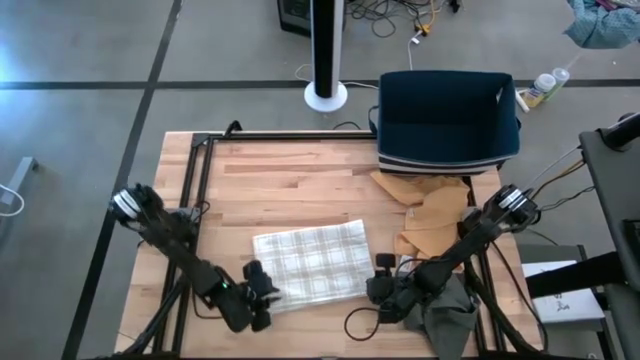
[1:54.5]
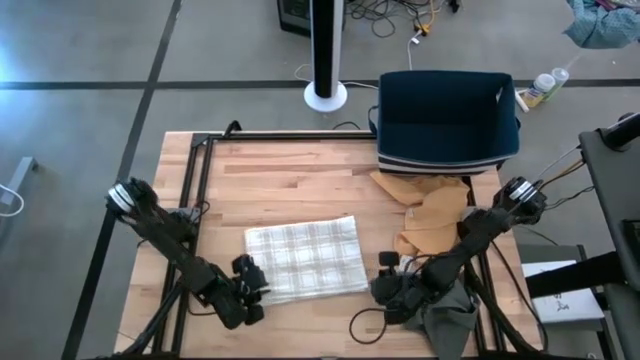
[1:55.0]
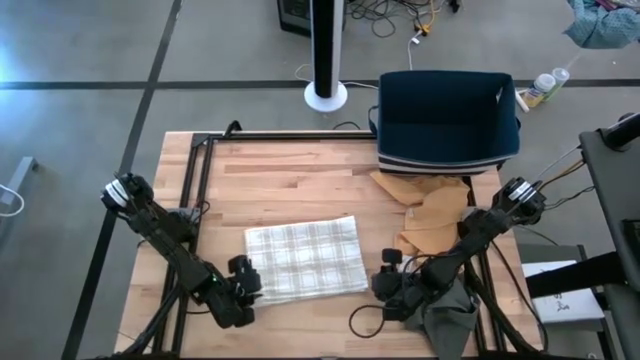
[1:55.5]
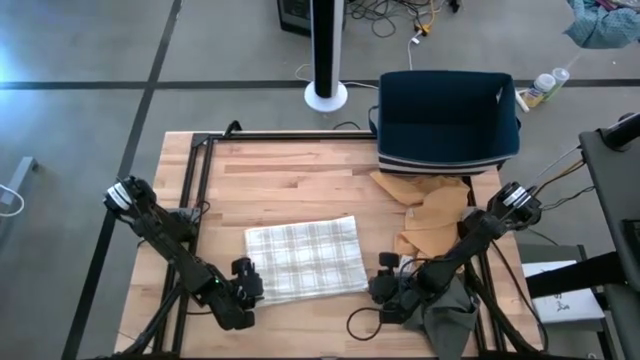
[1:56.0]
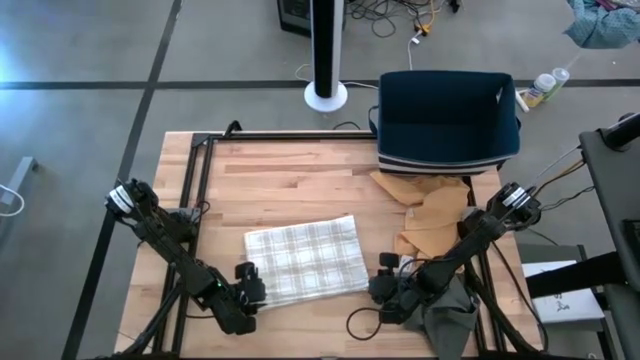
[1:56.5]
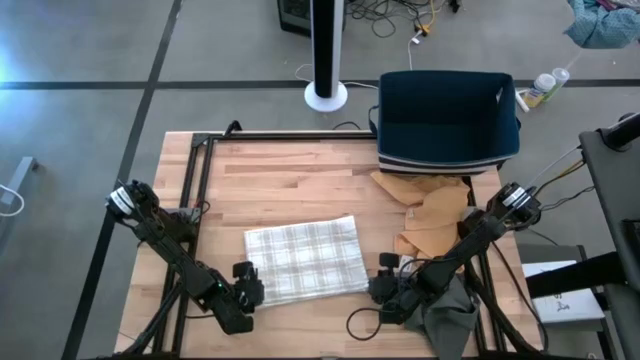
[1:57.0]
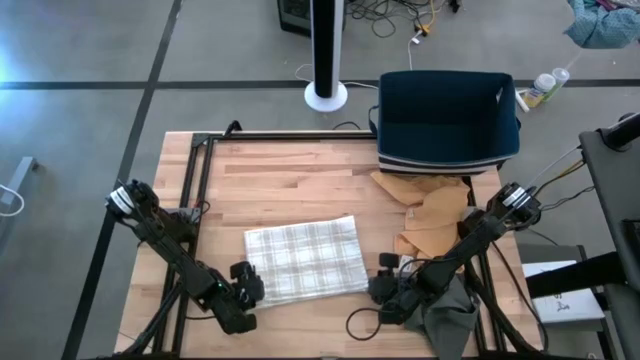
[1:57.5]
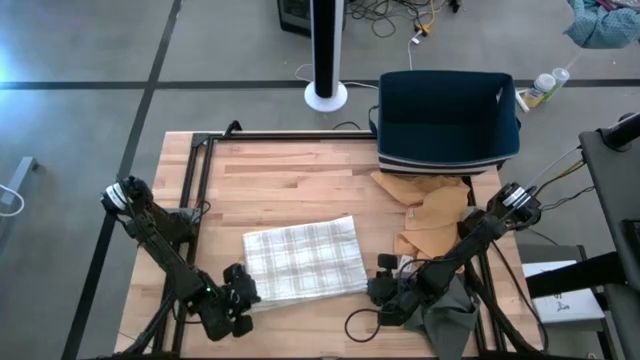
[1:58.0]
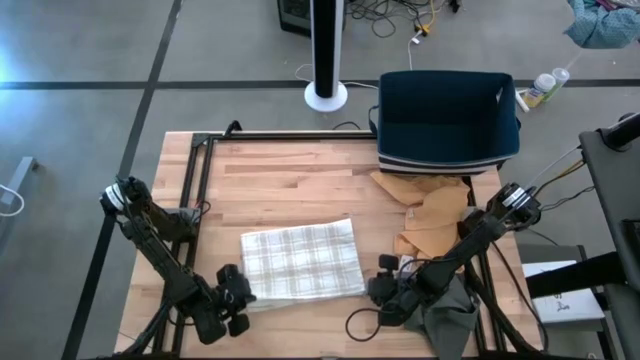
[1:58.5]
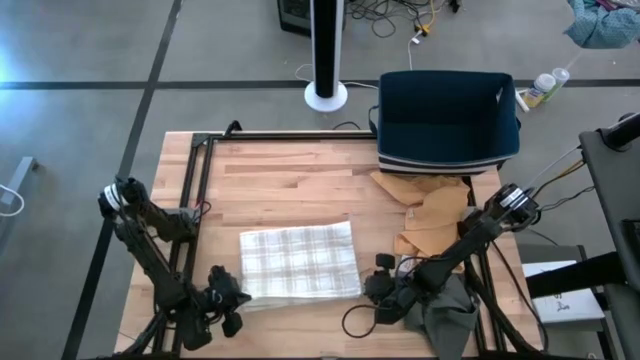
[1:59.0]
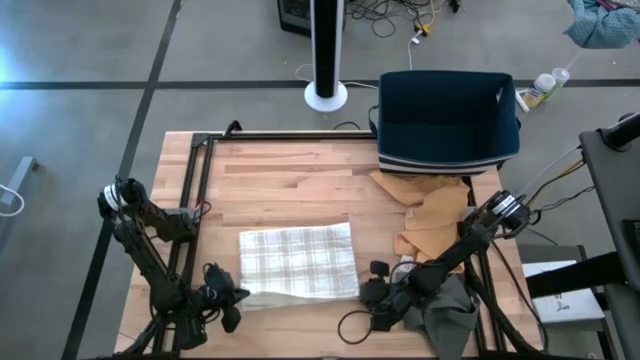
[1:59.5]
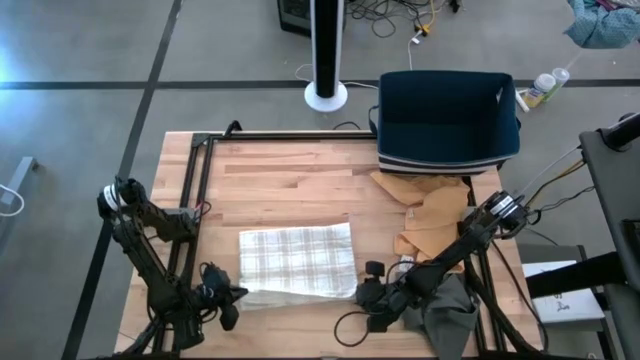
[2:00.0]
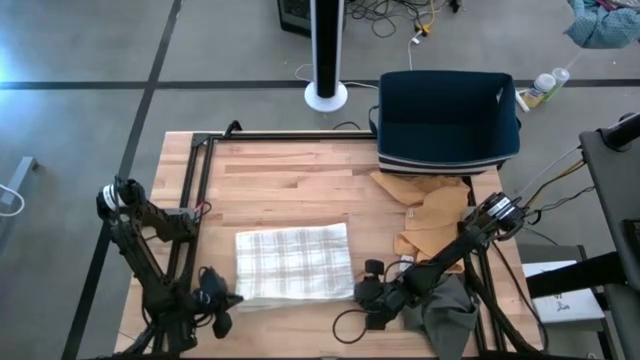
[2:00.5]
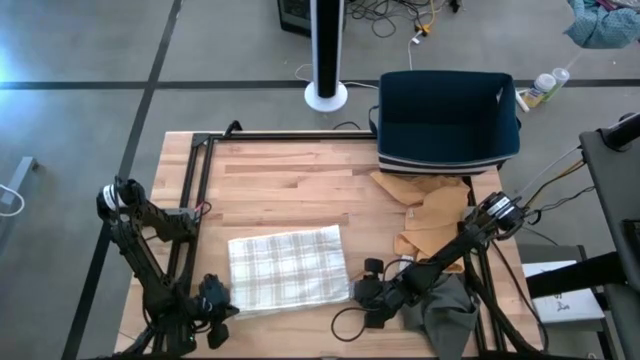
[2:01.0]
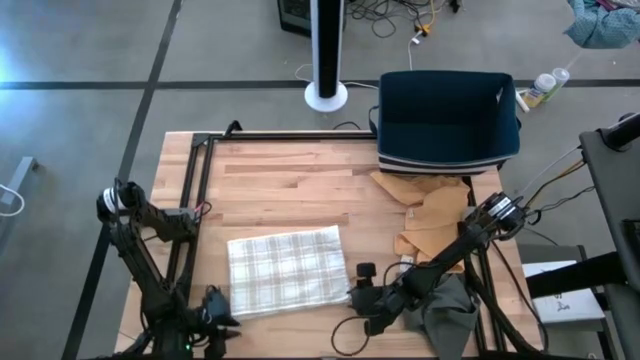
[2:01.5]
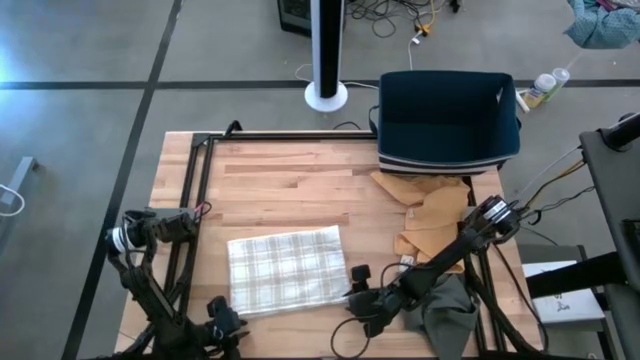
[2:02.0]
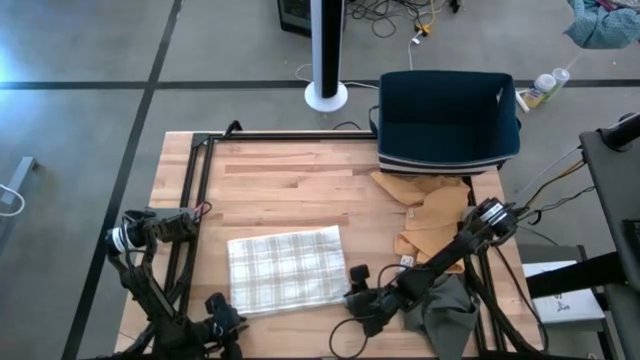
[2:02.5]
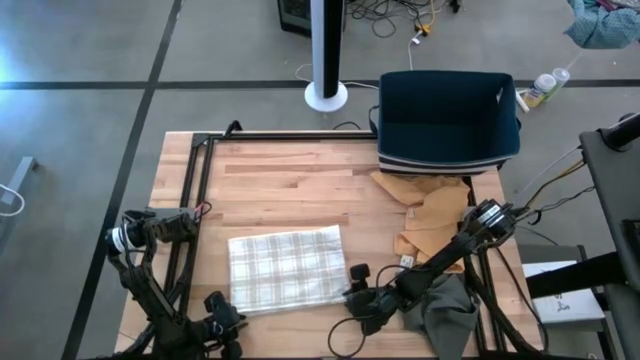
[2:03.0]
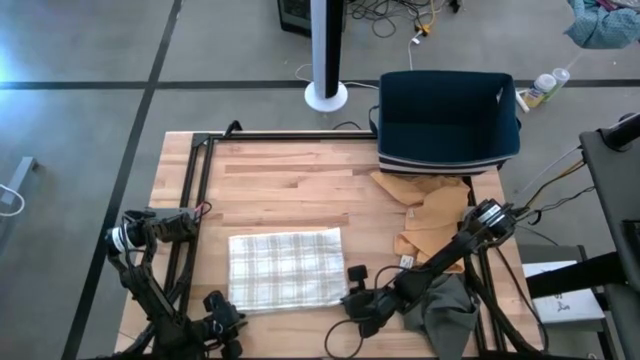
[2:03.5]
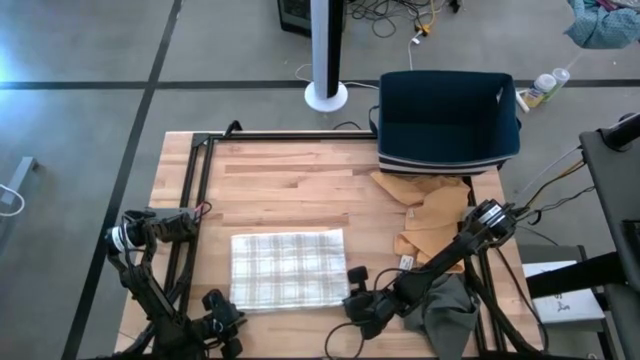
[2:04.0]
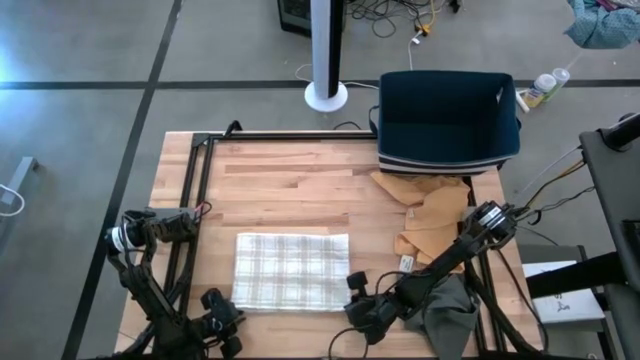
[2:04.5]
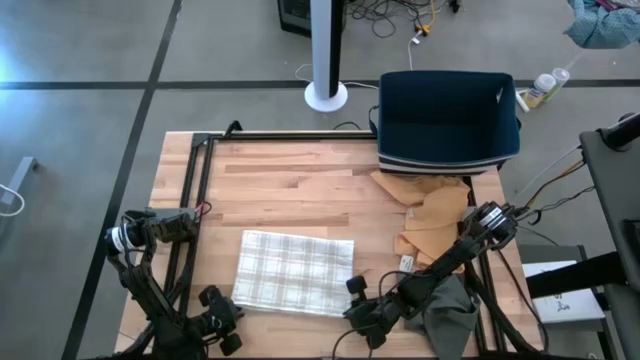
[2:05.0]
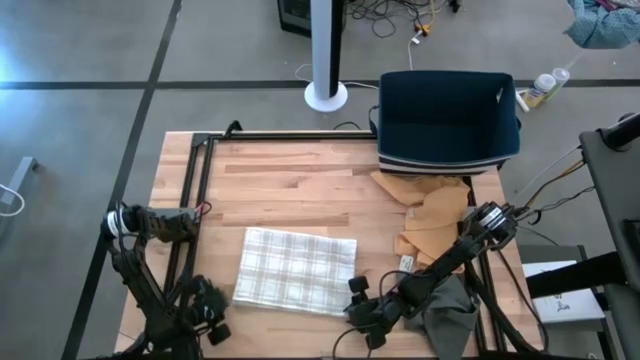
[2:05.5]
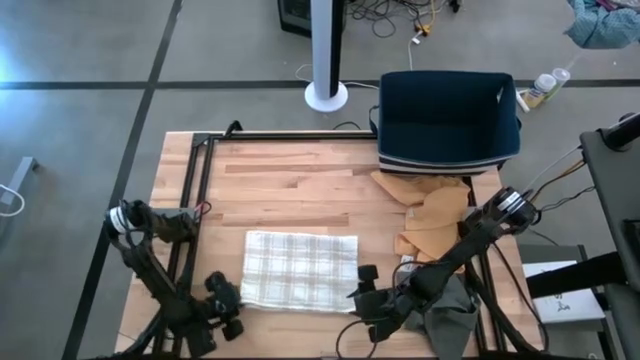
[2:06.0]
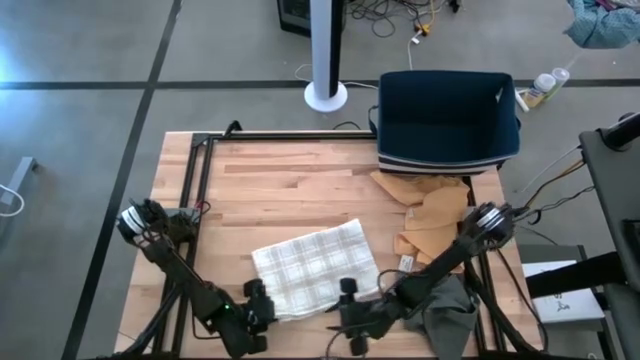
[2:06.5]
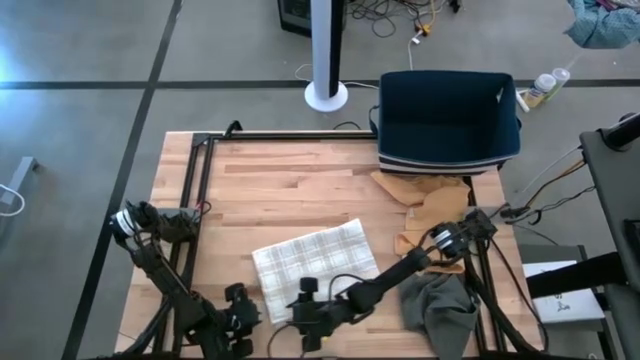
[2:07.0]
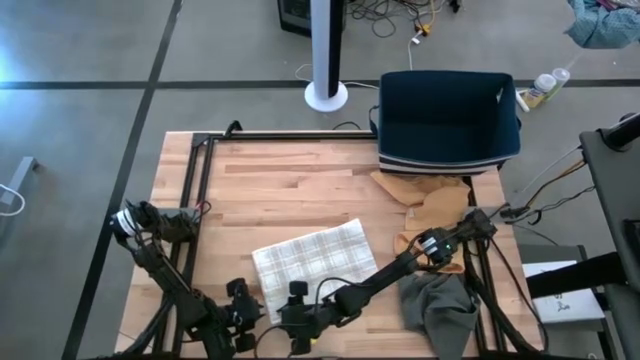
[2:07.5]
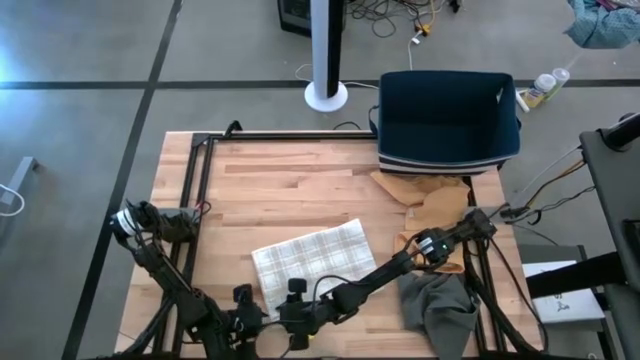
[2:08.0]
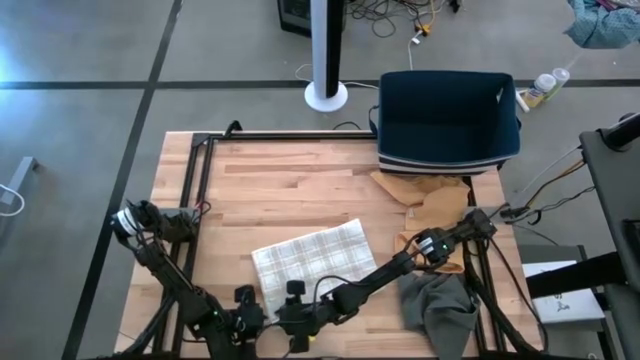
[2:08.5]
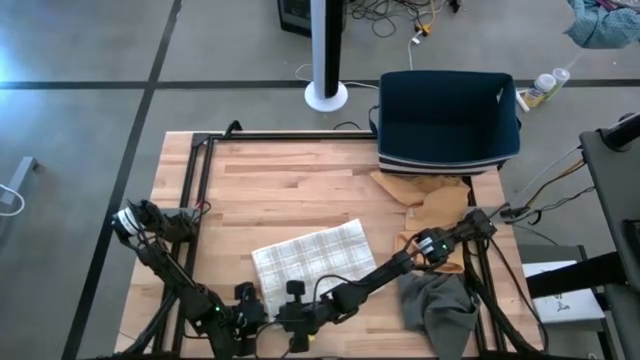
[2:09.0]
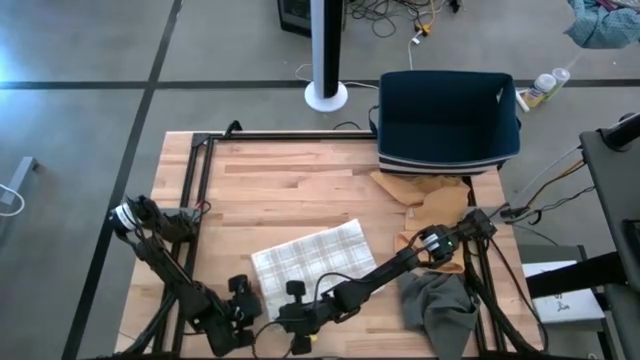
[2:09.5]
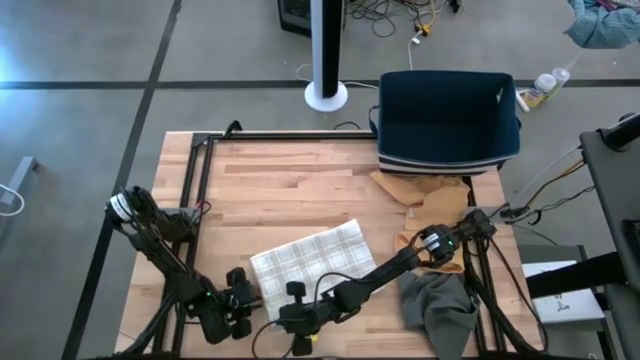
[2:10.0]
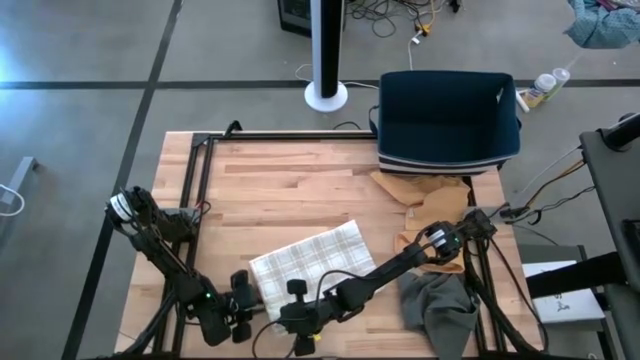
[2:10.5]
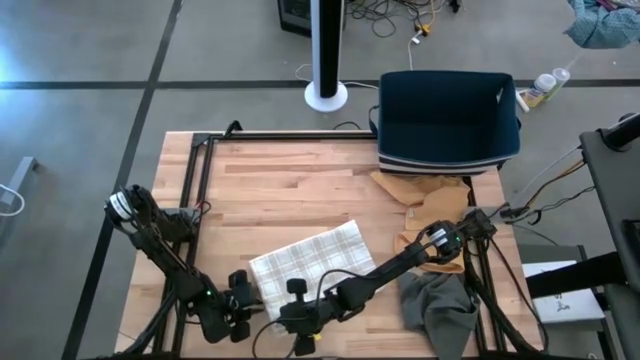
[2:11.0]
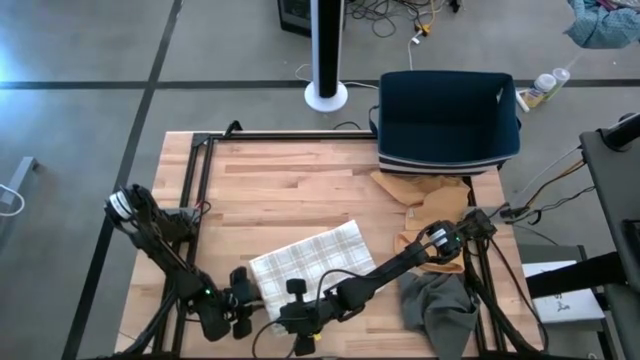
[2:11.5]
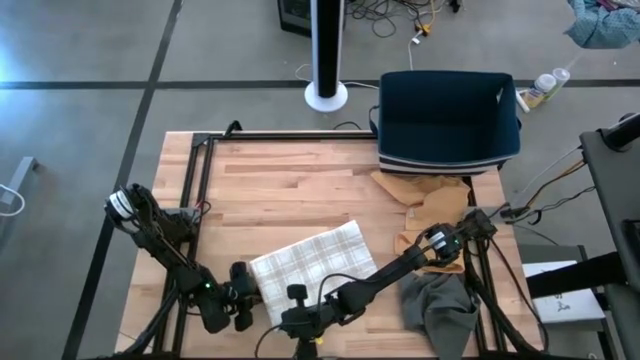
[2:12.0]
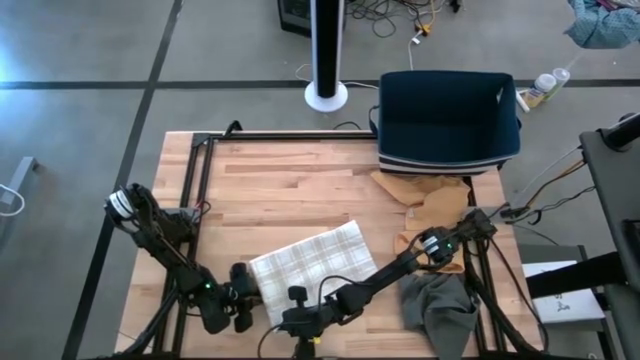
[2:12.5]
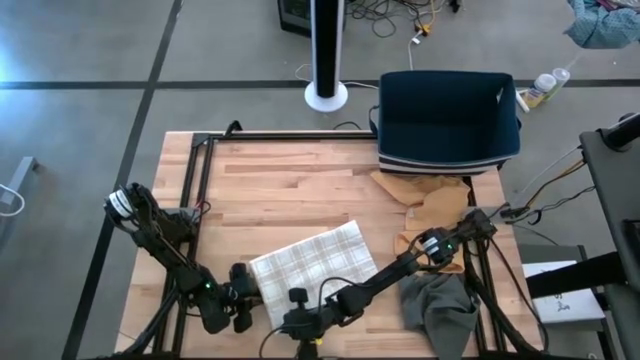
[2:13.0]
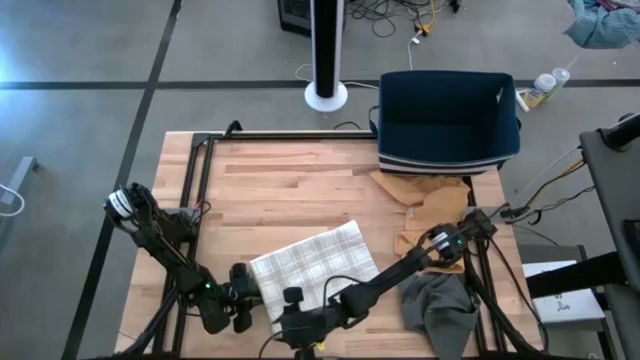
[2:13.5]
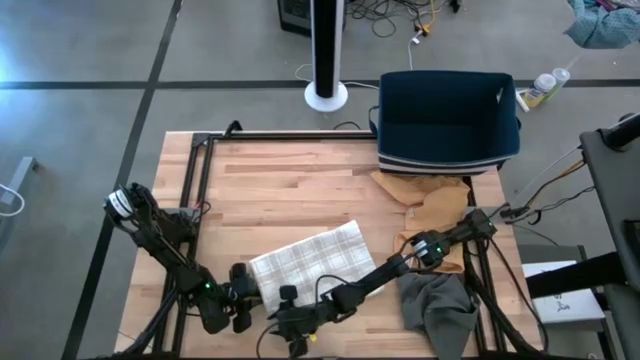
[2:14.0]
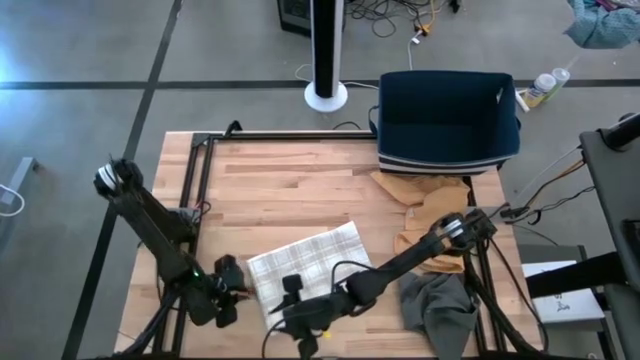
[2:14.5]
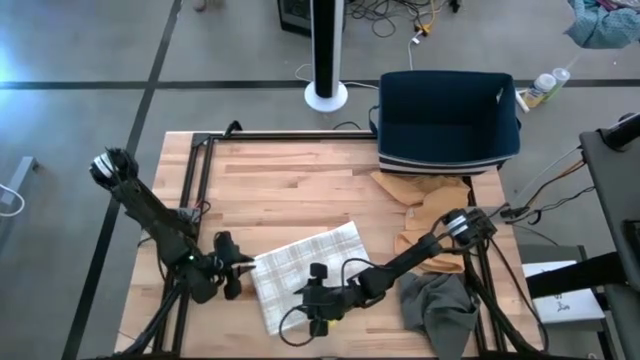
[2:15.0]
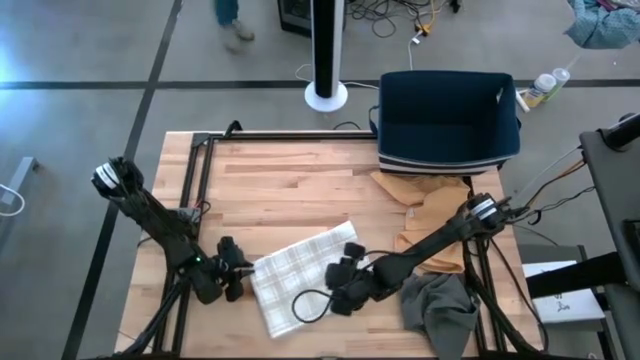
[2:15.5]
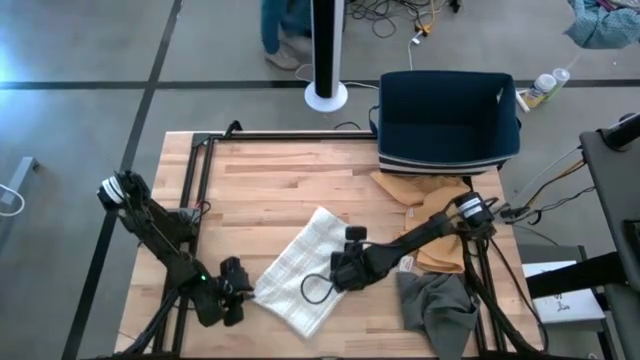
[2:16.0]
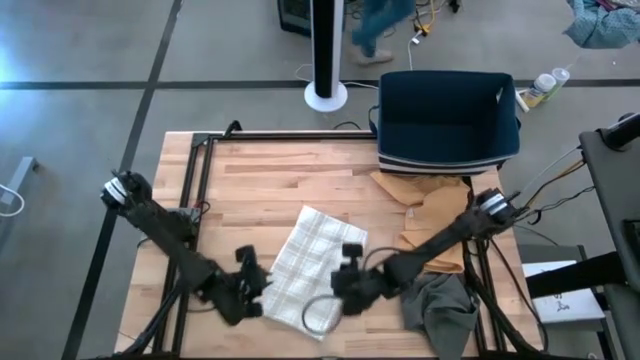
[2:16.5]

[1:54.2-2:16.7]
Task: Fold towel
Fold the white towel
